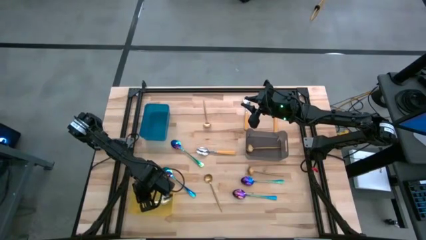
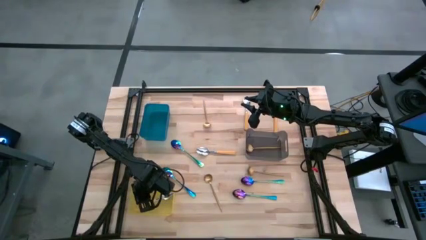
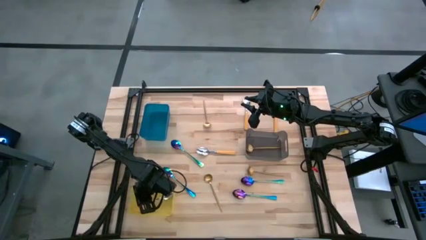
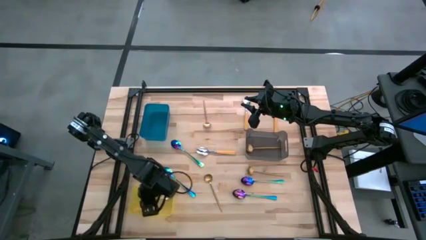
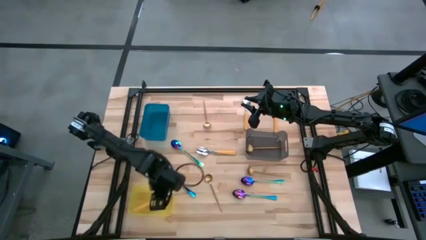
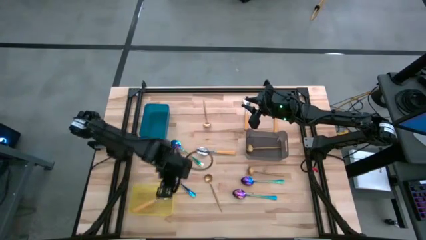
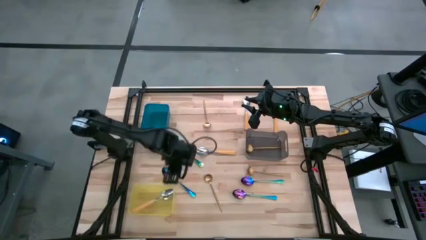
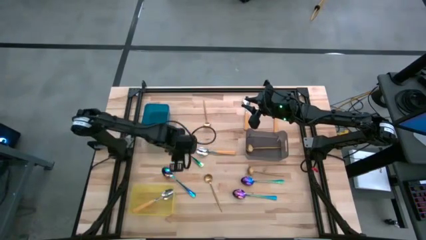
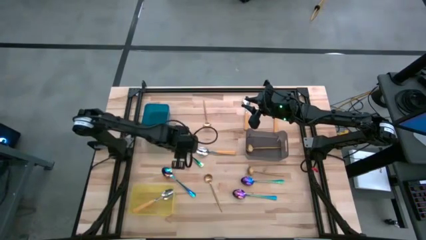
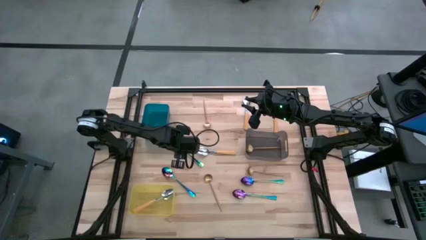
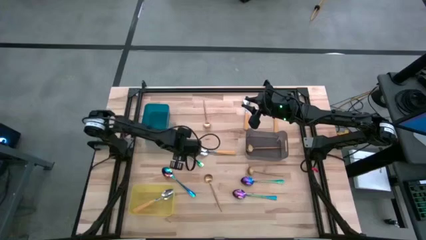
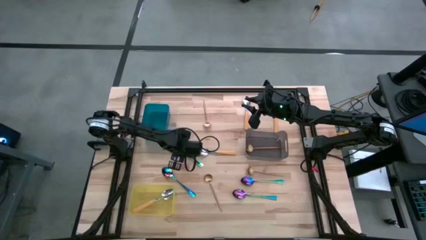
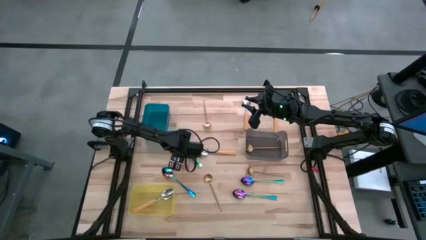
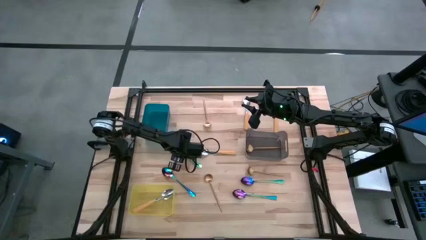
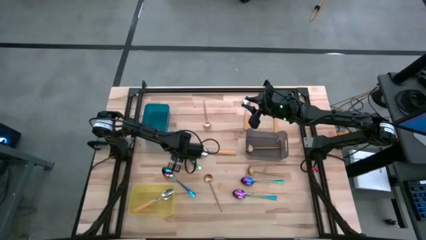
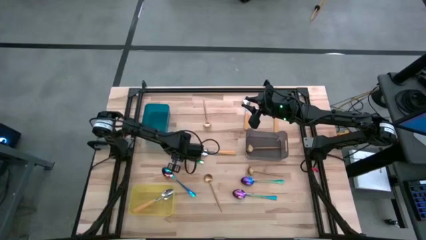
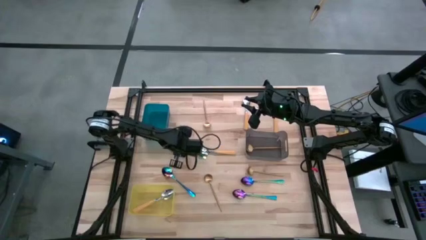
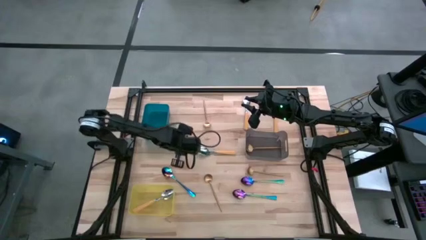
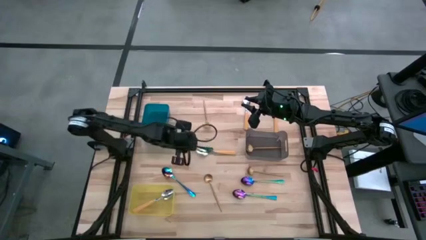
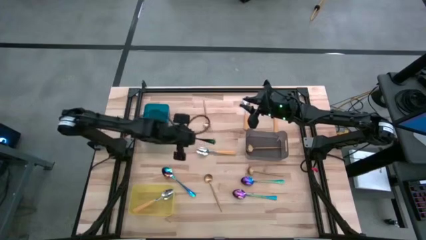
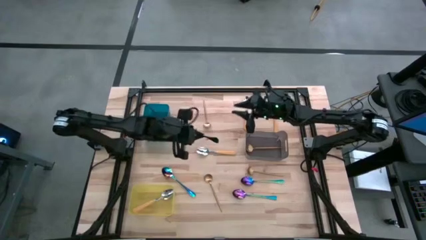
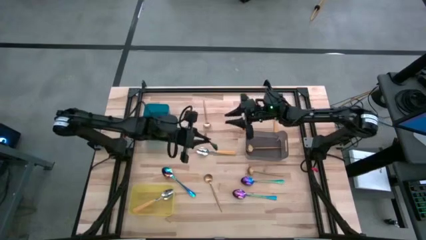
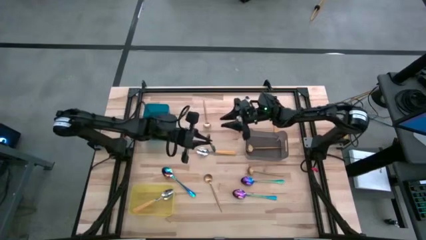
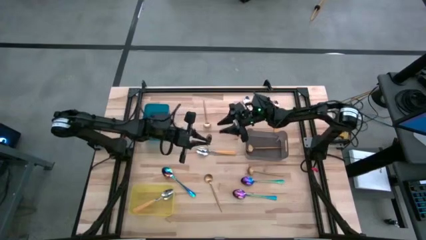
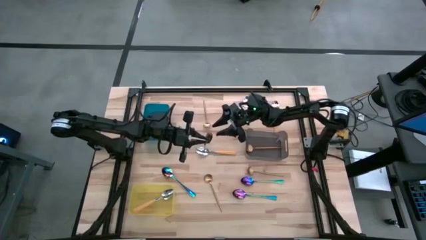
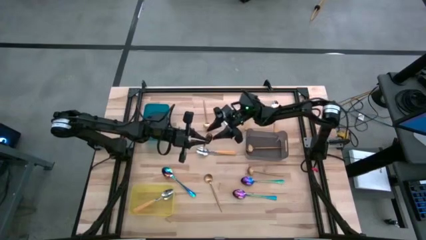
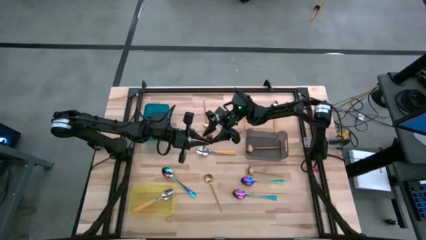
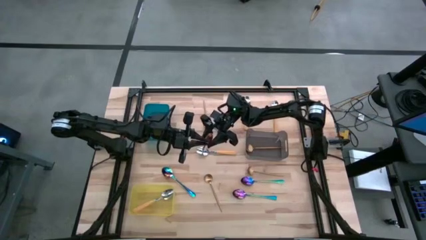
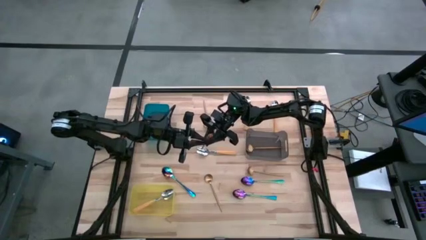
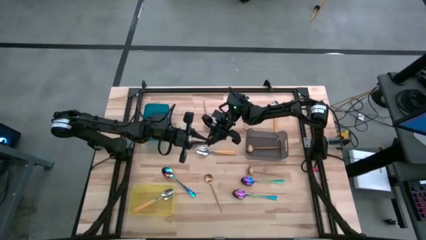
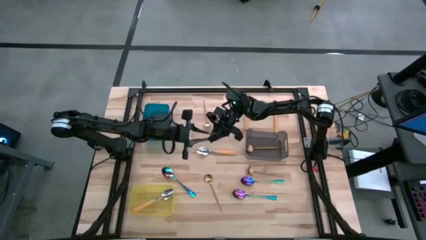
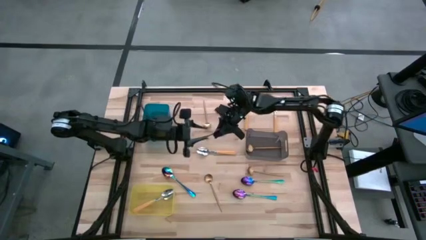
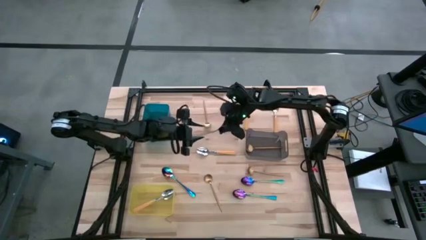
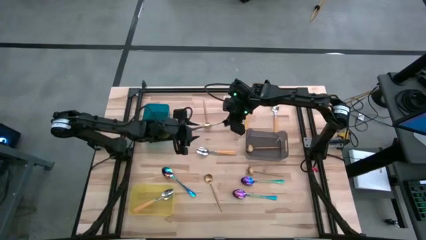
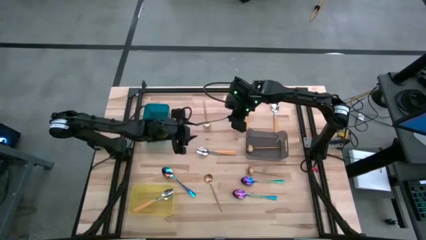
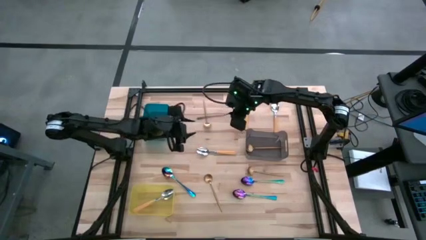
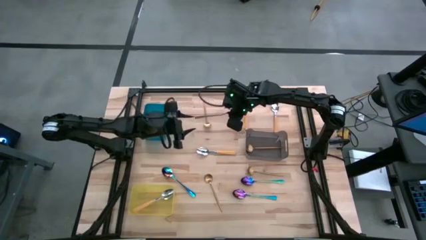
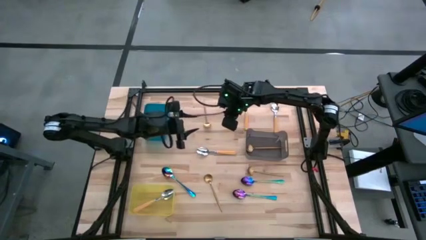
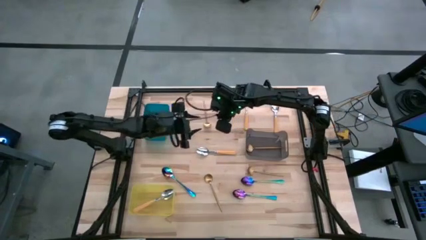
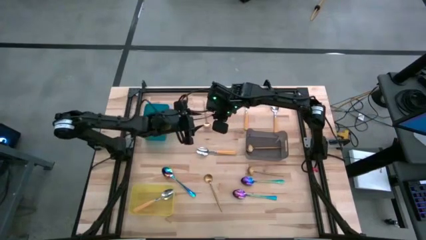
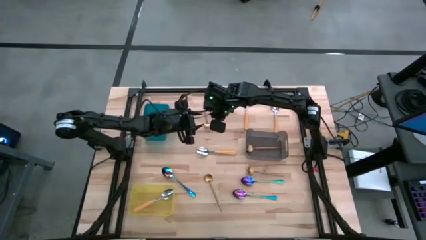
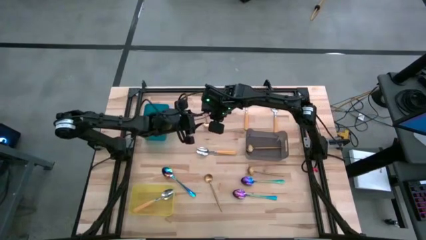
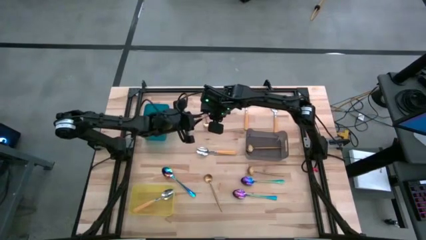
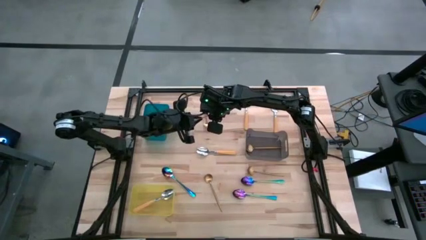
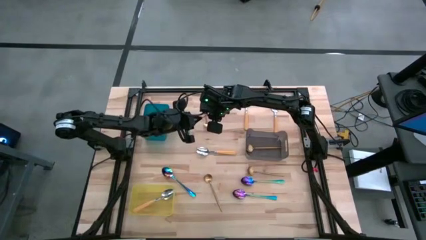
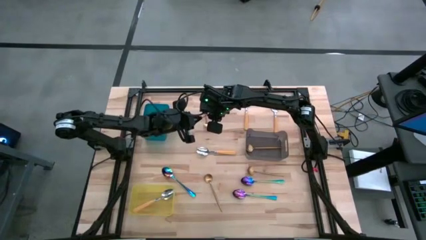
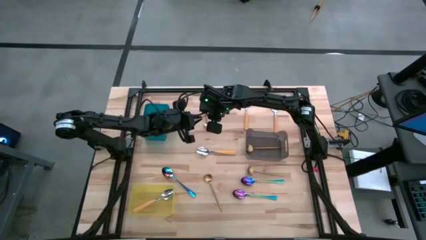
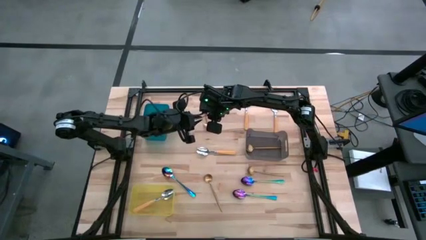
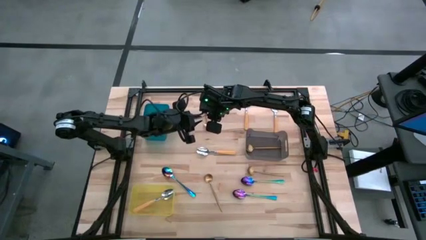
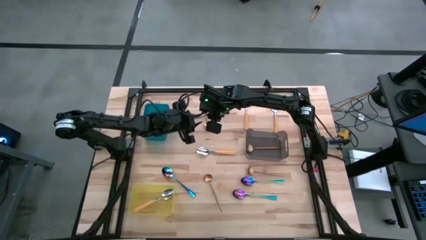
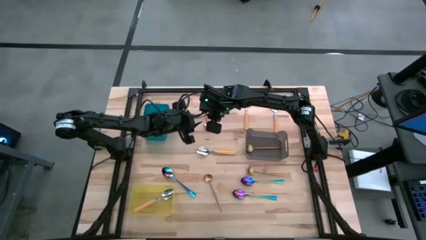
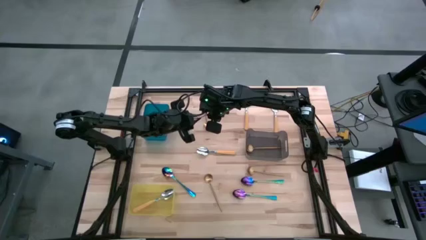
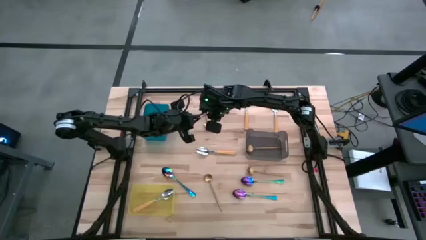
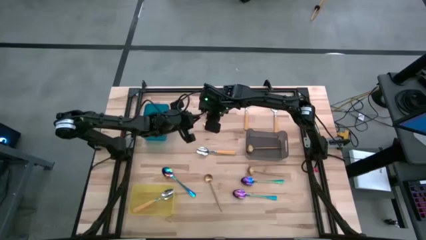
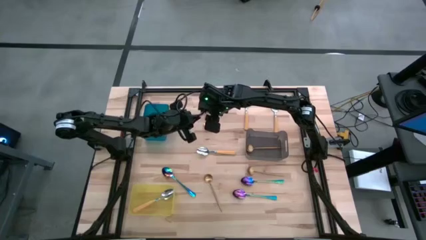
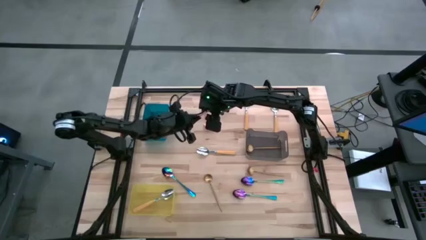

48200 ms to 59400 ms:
Task: Sort silverware by color (type)
Put the blue spoon into the blue bin

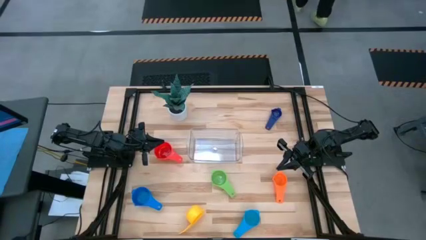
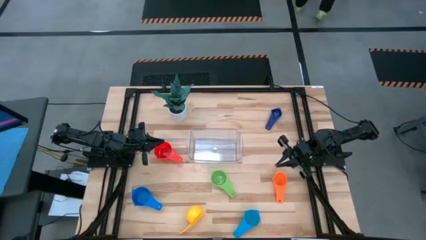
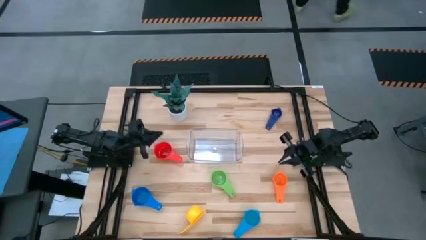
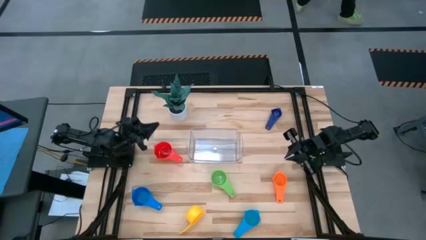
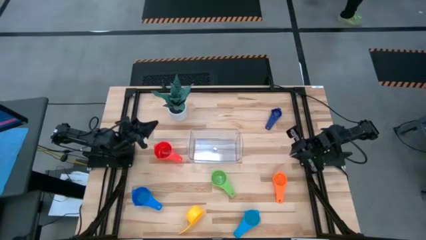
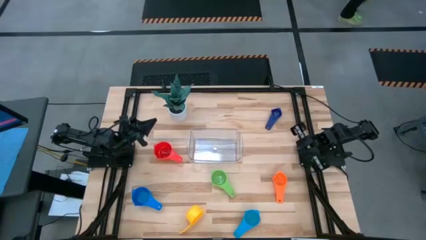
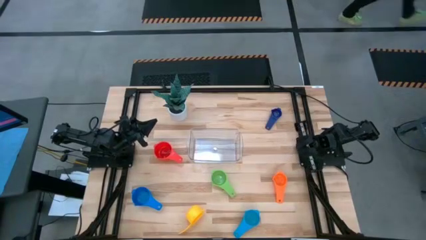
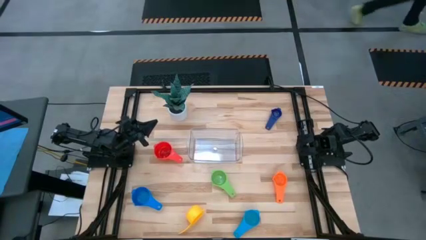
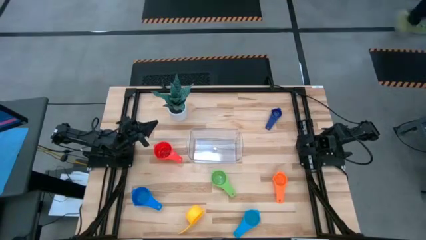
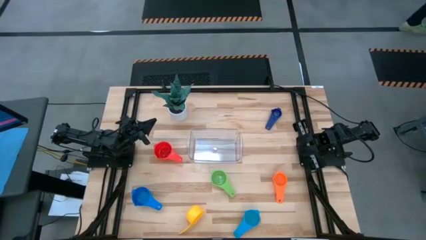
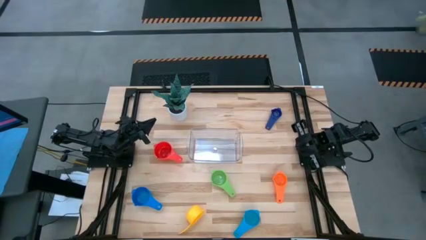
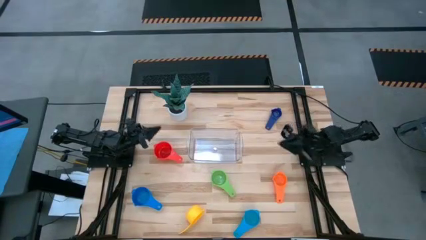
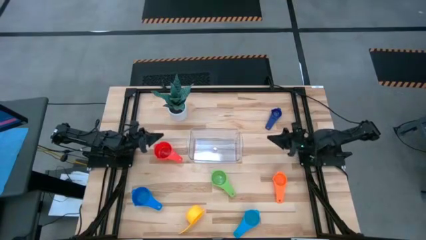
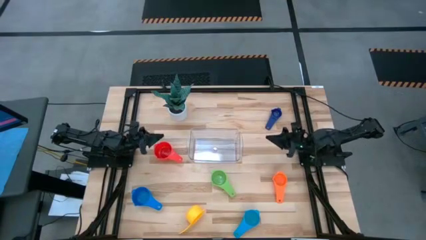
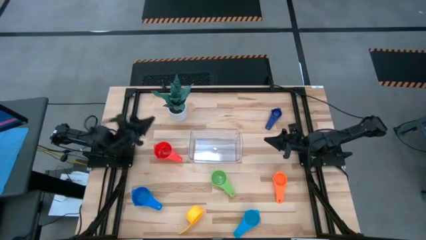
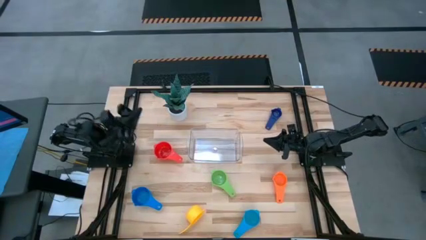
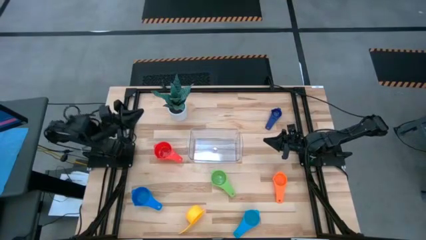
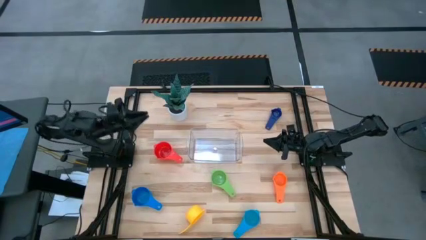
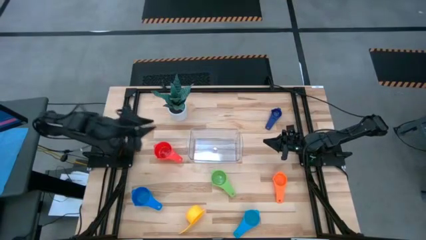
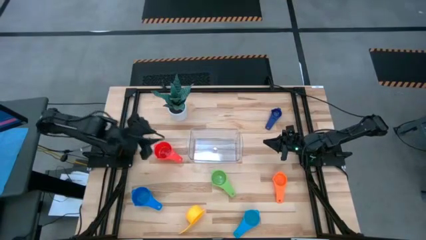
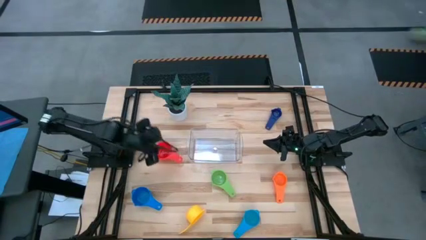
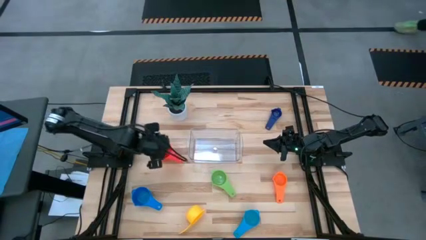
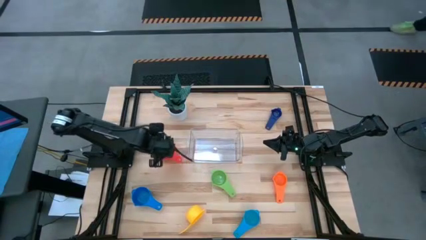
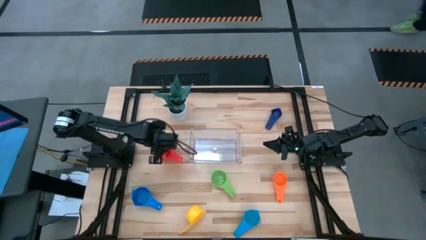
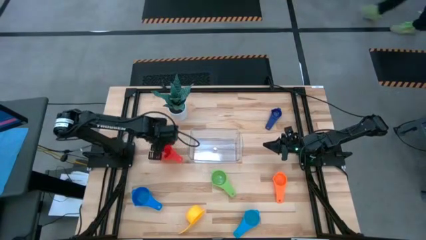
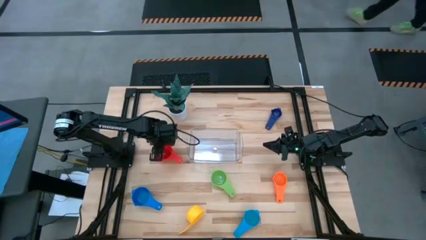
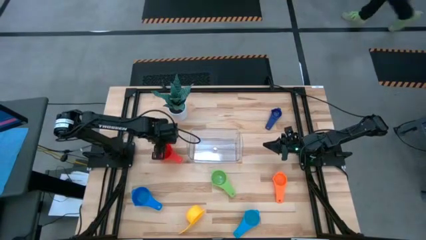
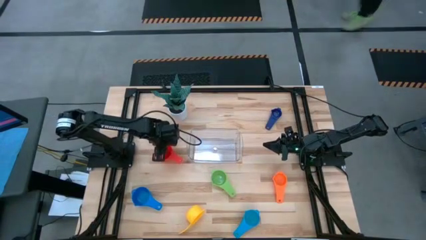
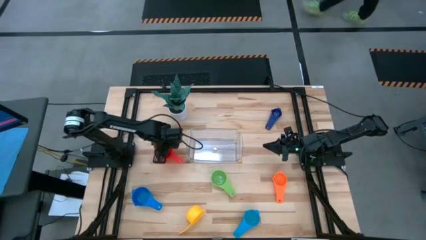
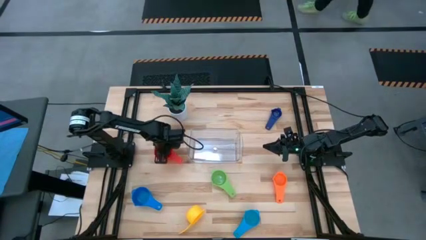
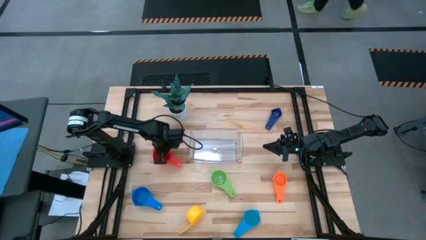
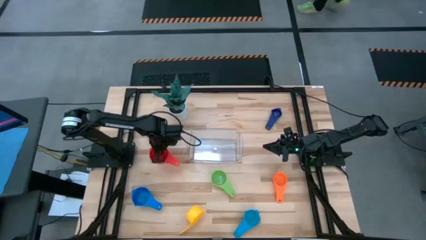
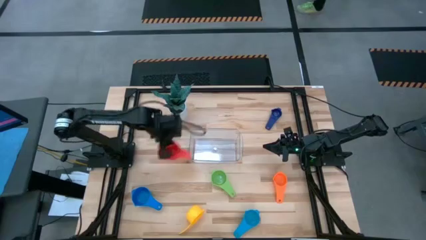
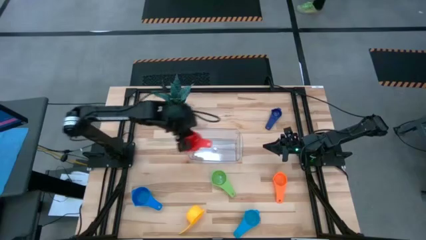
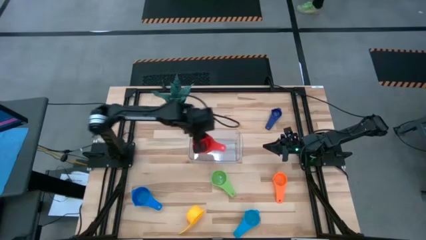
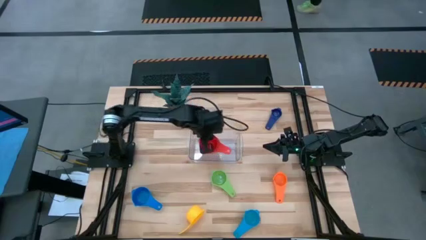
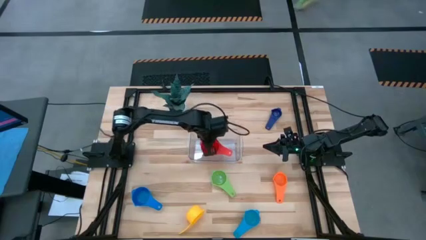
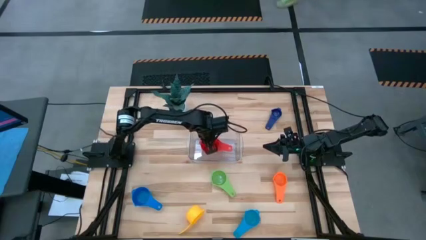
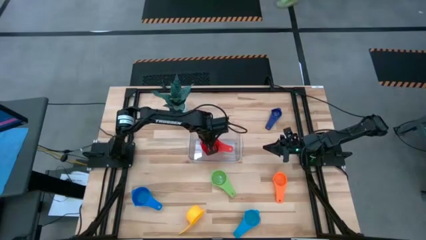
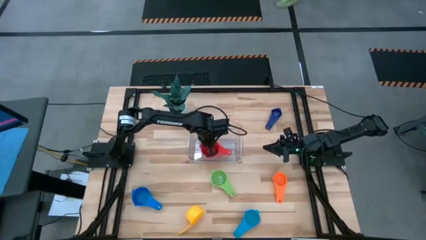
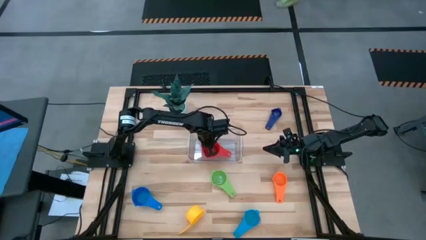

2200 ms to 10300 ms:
Task: Nest measuring cups in basket
Put the red measuring cup into the transparent bin
